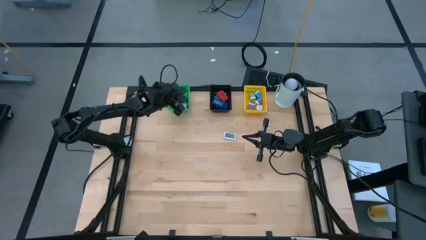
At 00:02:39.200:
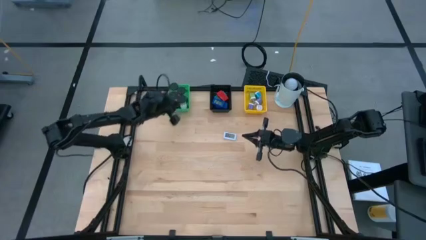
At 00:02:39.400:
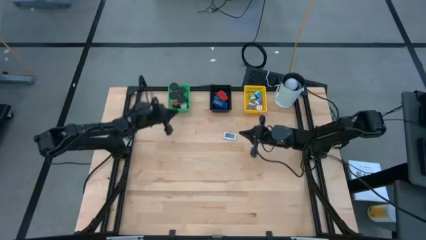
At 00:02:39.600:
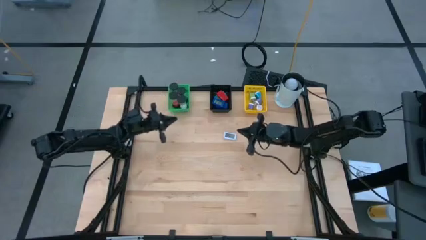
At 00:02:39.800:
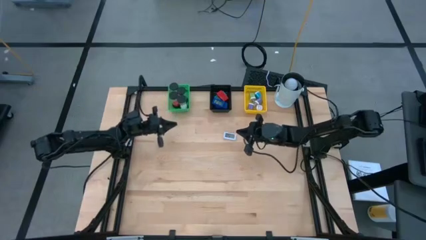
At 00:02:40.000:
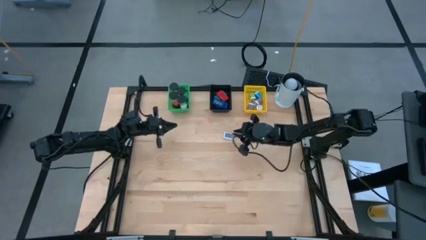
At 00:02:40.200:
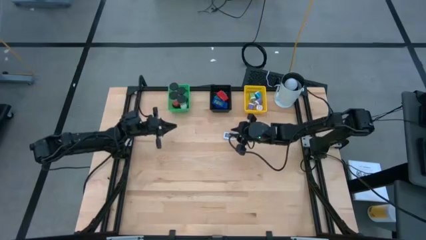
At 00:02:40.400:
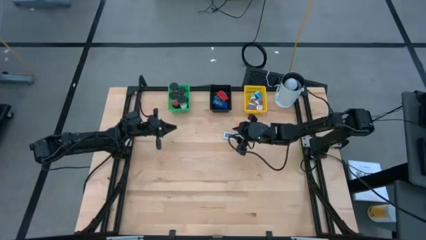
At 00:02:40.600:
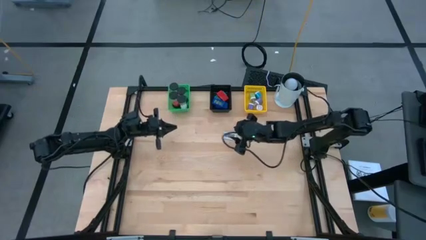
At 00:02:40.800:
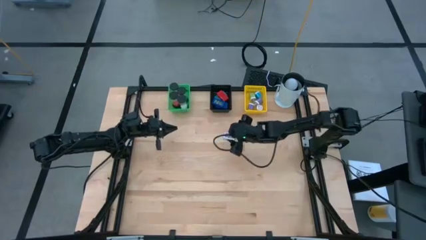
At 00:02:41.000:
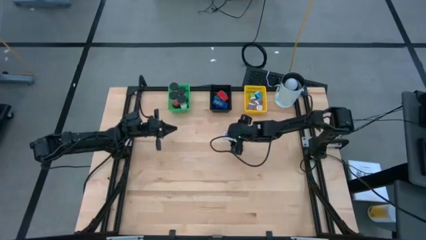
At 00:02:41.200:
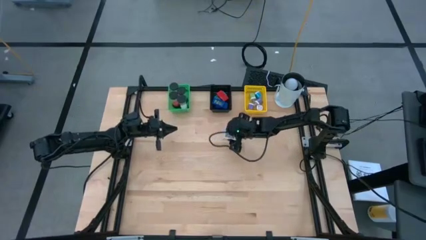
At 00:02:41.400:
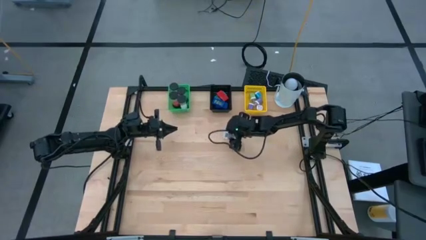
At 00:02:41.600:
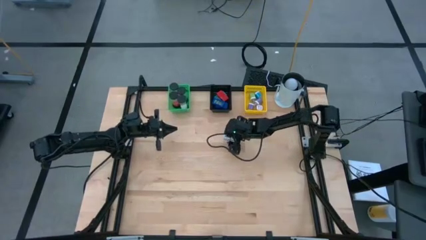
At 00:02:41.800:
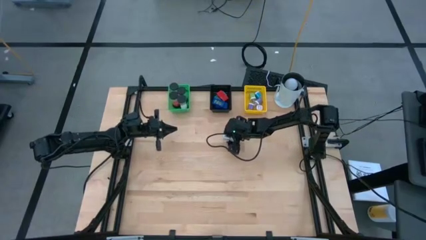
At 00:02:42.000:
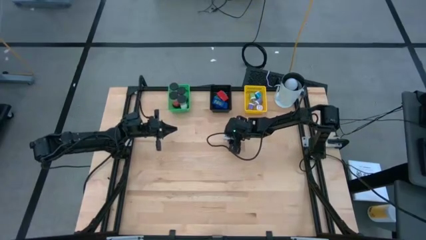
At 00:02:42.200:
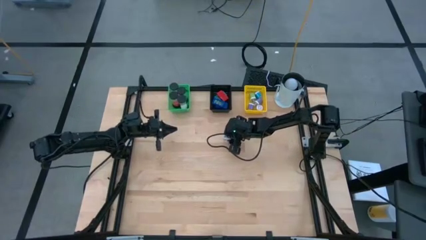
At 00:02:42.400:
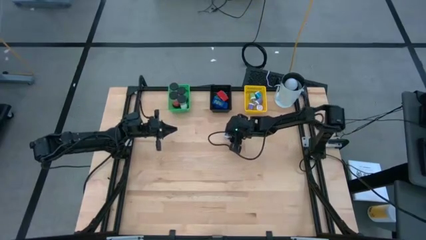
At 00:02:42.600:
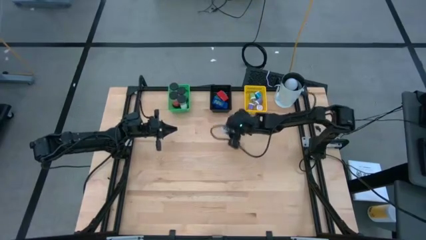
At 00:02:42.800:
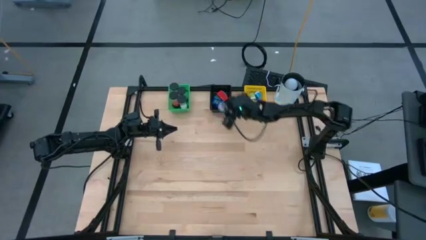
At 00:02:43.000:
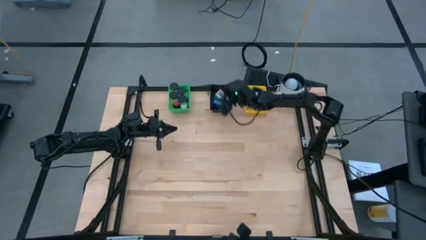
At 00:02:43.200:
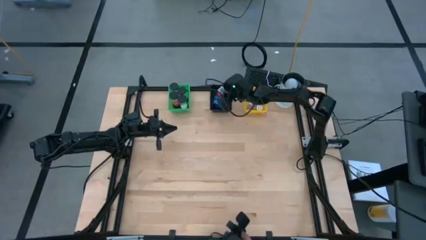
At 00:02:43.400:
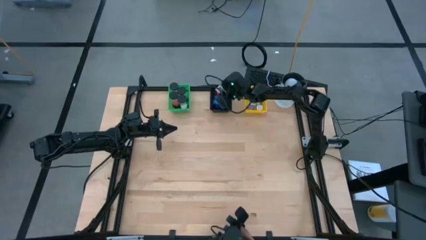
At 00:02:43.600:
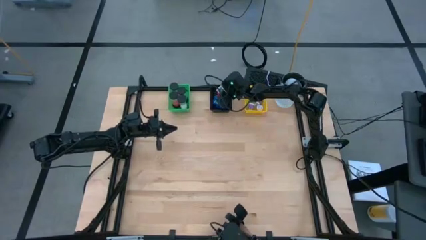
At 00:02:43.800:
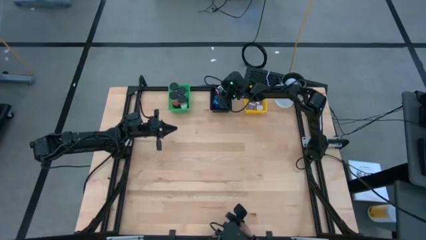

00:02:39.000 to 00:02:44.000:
Task: Pick & Place Office items
Put the white digital timer into the green bin

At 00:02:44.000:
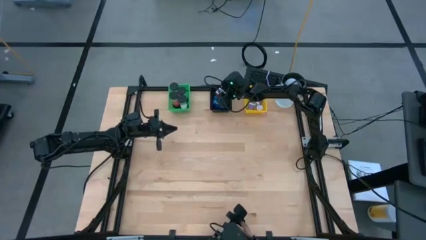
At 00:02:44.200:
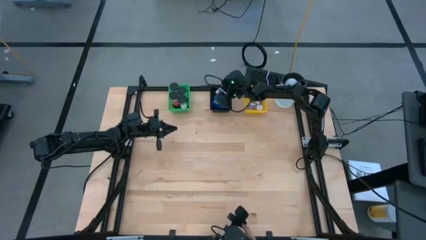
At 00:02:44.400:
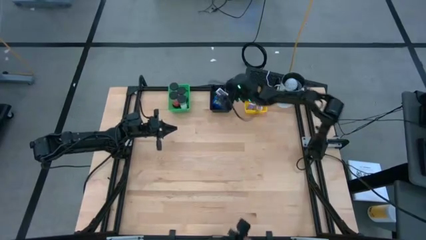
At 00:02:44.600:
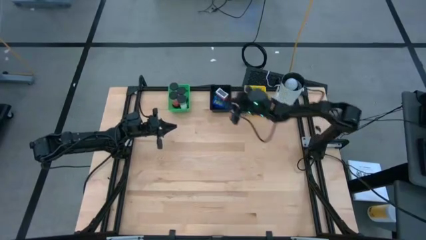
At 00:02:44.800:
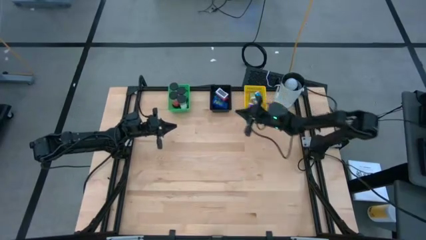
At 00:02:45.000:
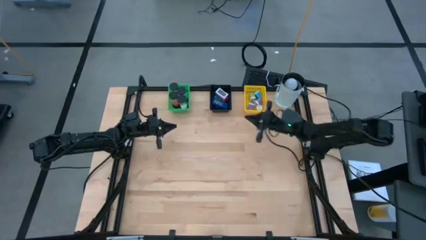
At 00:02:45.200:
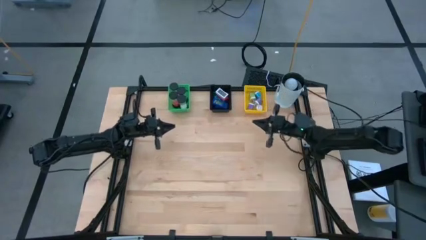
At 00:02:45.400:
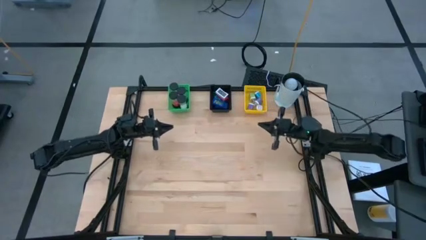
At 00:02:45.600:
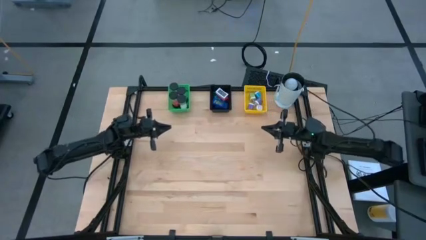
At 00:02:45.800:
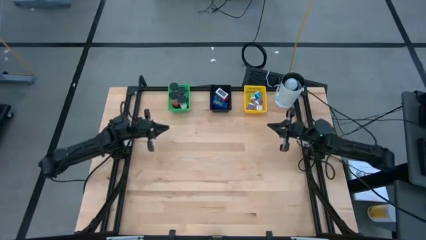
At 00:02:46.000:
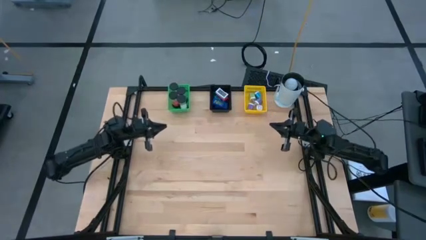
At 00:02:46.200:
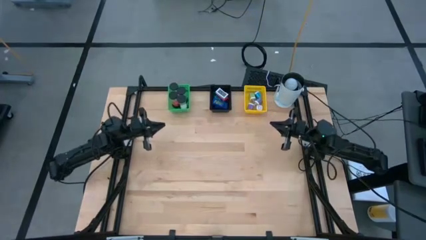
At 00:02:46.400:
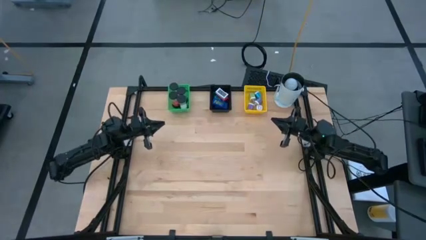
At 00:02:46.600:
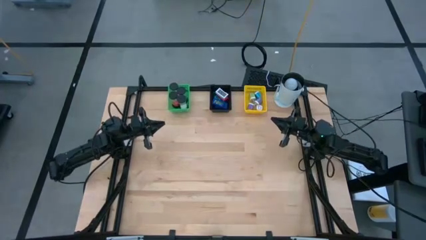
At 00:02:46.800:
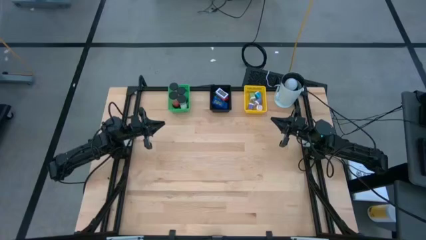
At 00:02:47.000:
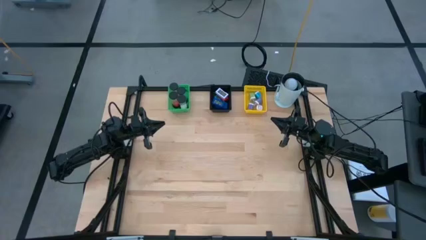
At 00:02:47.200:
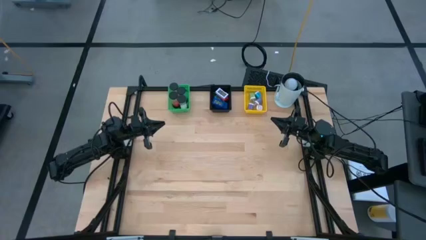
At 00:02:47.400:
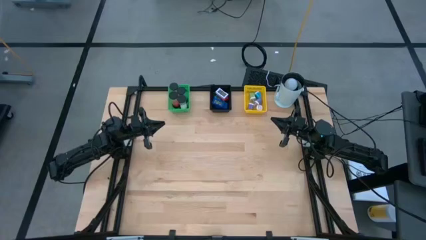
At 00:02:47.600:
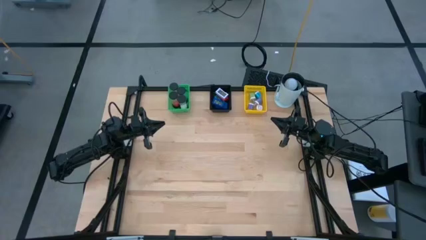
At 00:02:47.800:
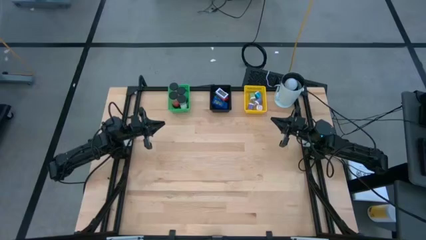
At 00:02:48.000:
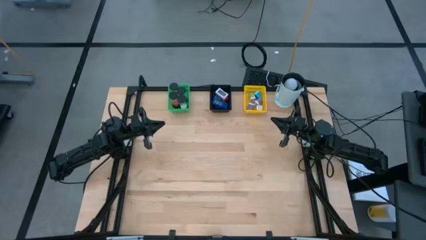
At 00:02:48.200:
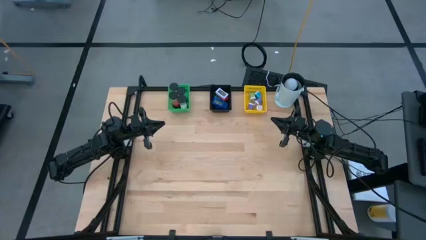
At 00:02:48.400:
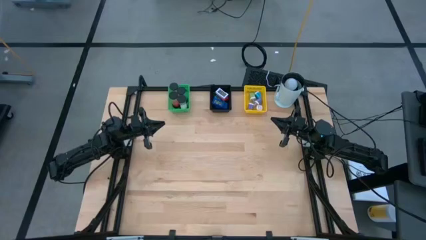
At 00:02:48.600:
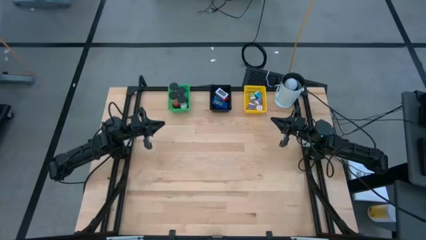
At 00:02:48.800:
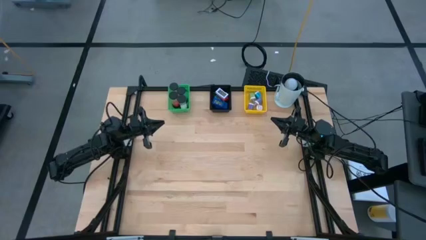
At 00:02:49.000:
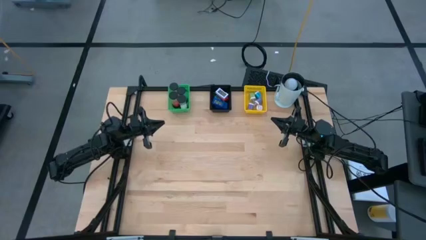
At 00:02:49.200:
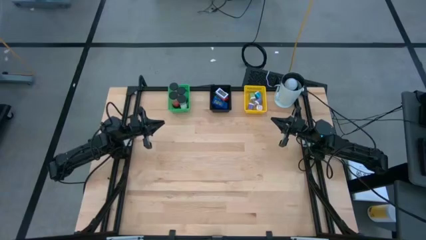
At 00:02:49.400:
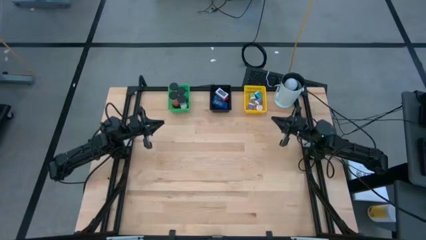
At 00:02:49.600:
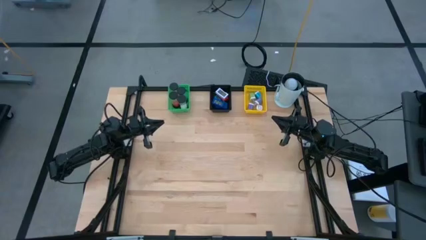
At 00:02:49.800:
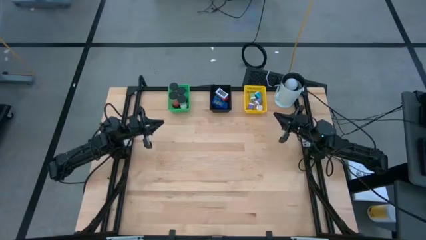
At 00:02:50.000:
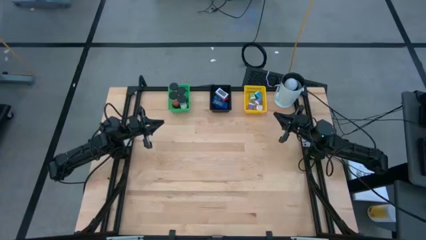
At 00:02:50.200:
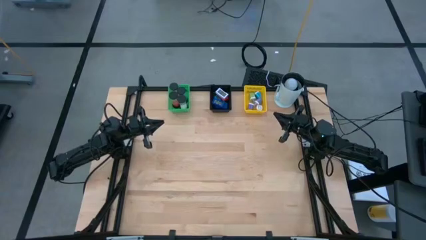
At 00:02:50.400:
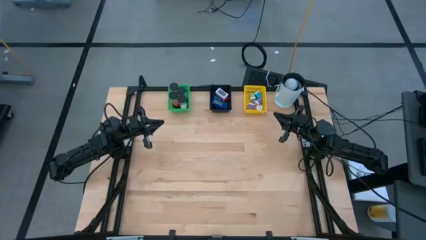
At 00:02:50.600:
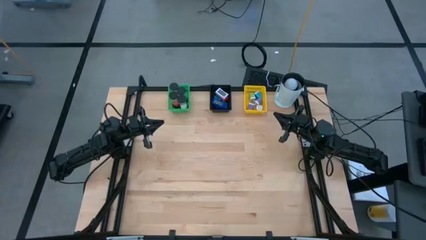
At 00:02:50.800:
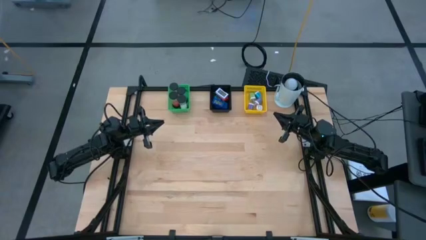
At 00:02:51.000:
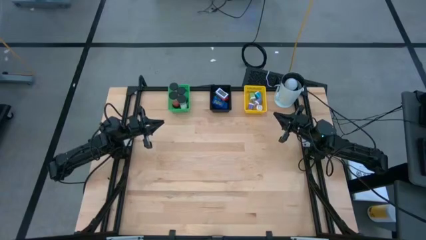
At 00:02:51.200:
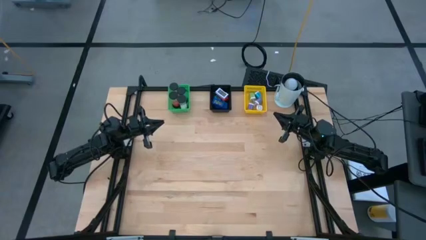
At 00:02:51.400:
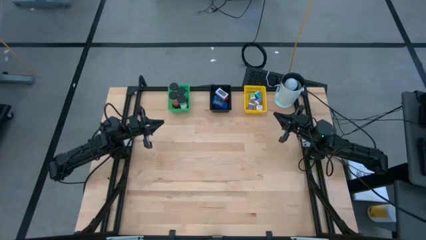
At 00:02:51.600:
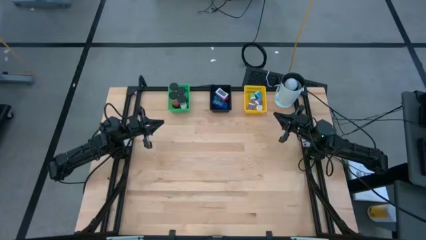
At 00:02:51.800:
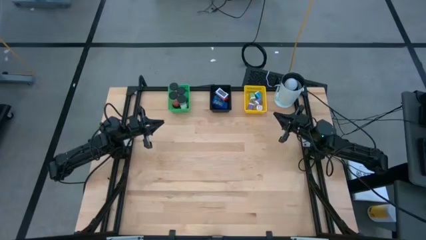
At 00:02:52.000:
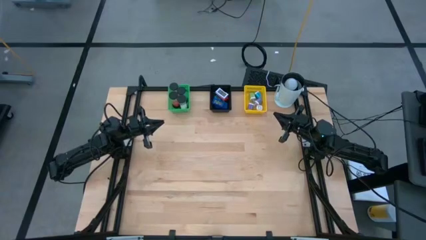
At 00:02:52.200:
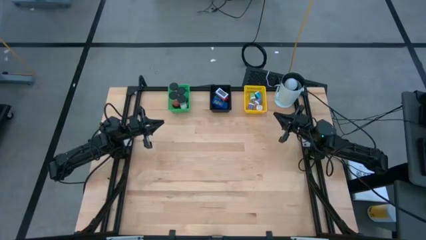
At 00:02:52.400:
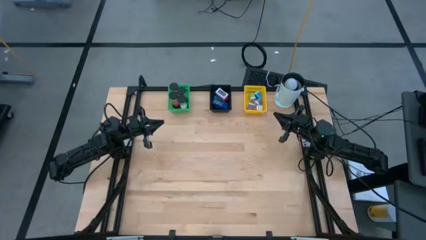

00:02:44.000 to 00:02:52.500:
Return to Home Position

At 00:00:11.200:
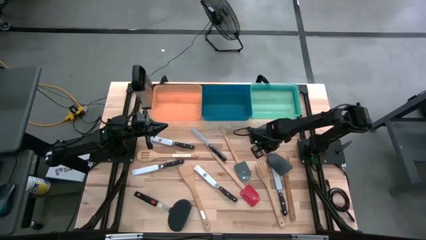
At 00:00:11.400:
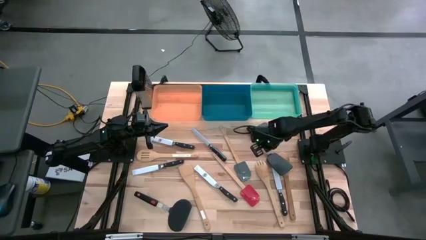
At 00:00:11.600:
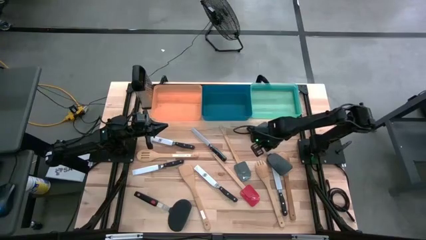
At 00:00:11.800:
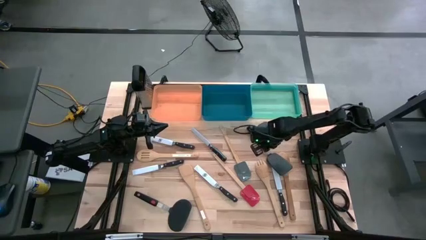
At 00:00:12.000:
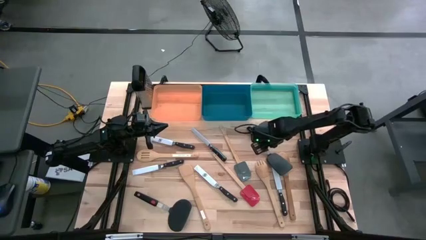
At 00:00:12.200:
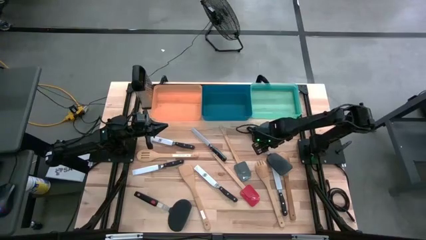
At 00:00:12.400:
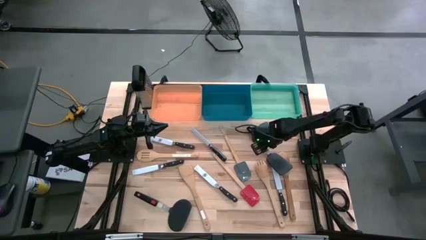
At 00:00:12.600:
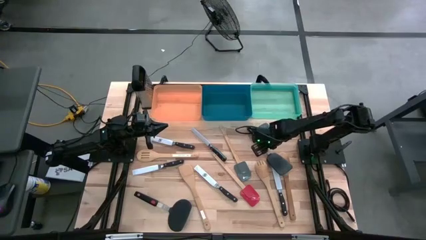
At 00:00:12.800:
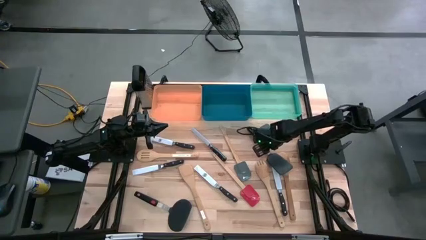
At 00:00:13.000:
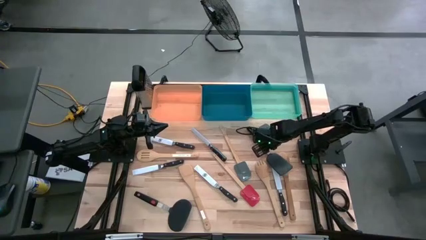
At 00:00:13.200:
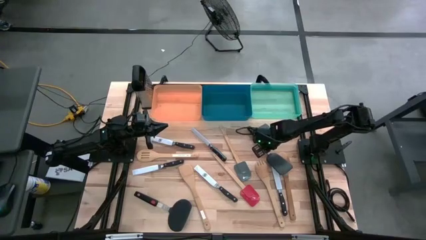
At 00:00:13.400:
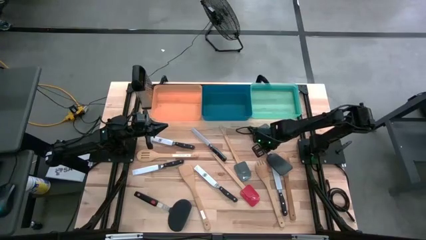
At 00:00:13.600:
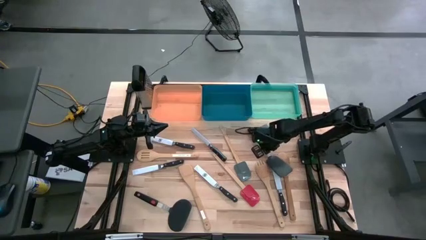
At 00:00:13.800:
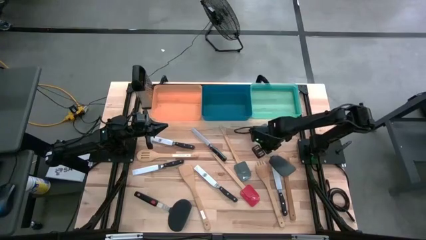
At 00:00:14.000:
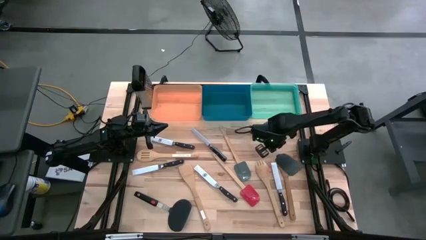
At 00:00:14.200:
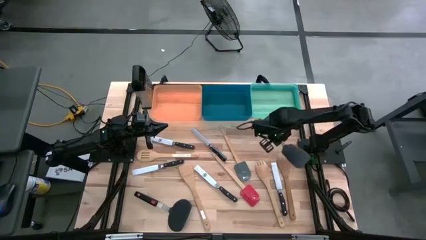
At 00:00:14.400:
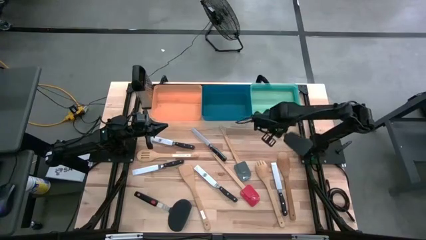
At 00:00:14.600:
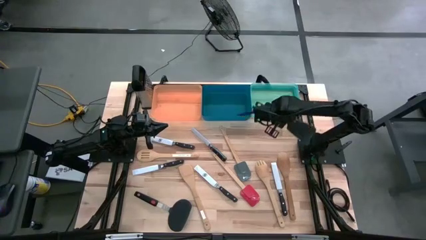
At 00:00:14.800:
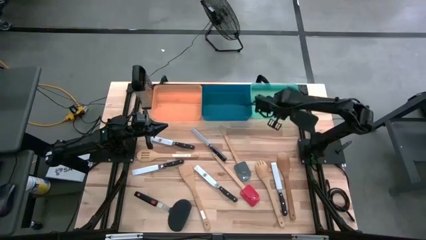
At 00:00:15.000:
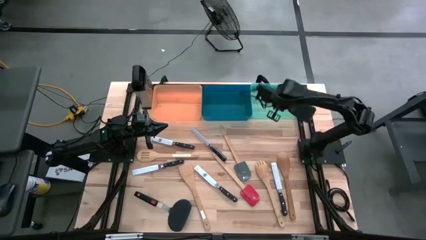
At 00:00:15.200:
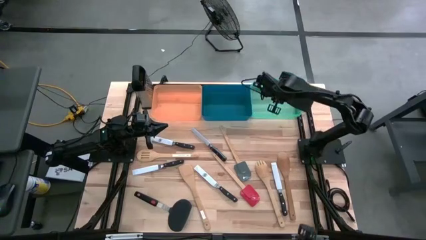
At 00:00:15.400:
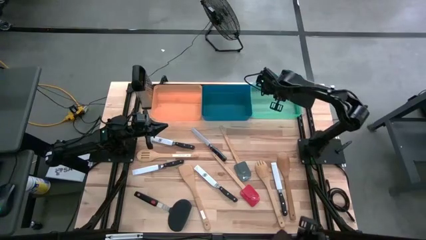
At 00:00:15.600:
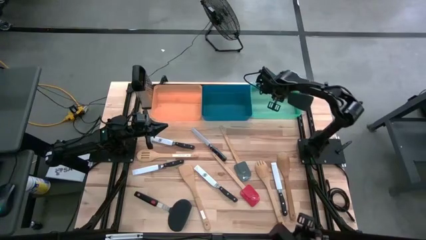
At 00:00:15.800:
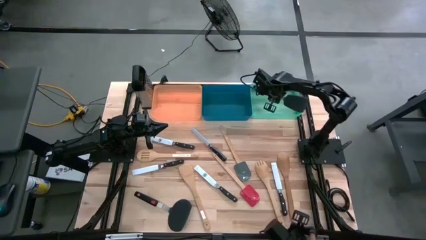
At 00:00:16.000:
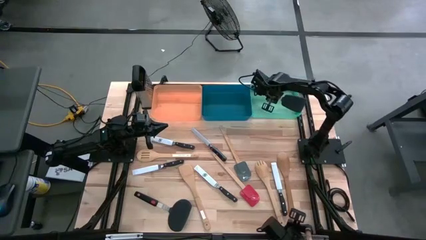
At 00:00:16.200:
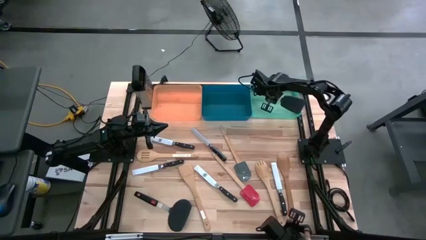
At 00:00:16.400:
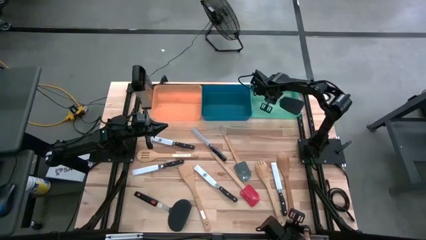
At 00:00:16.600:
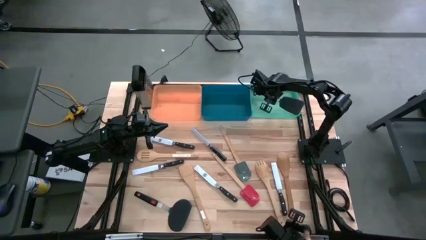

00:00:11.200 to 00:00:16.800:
Task: Pick & Place Kitchen Items
Put the black right spatula into the green bin
